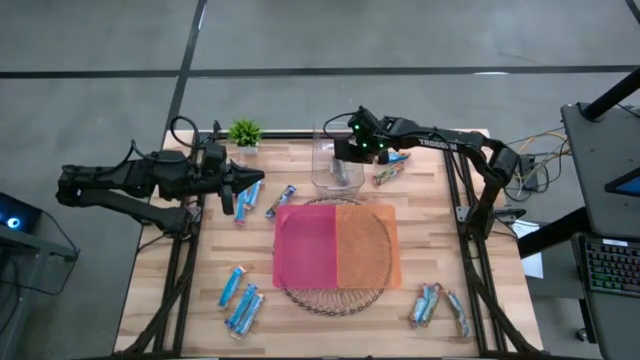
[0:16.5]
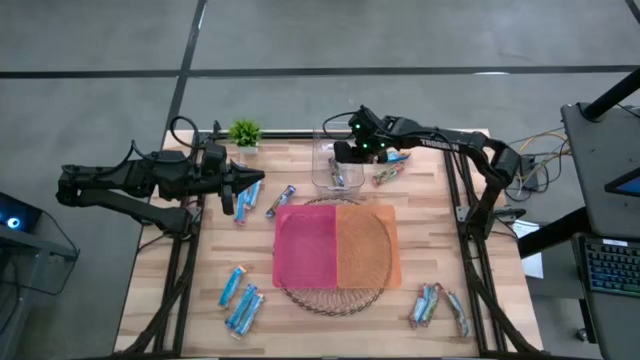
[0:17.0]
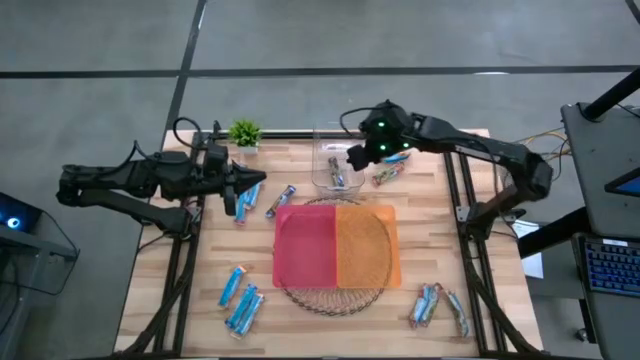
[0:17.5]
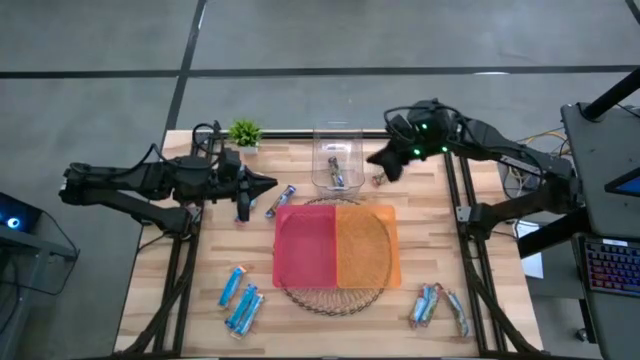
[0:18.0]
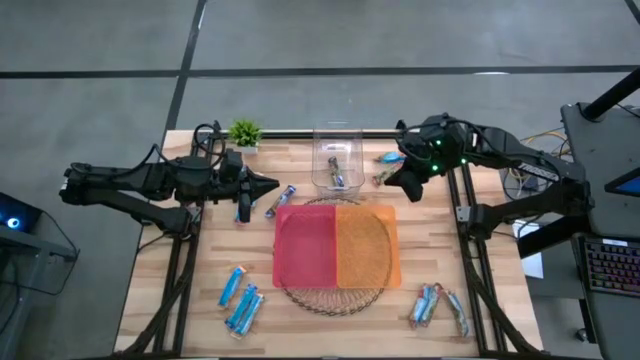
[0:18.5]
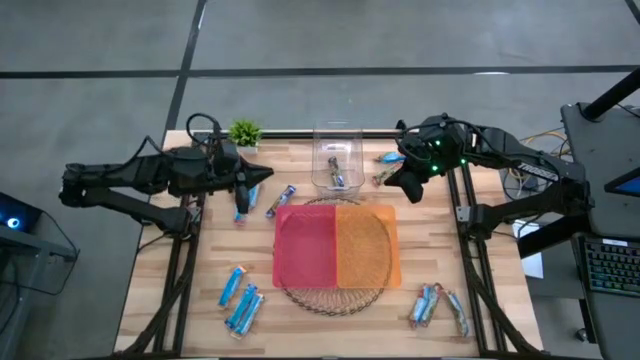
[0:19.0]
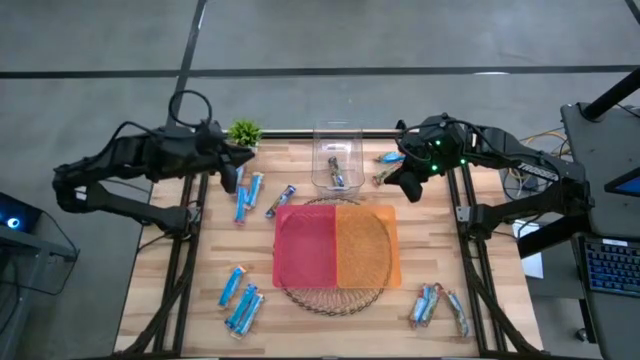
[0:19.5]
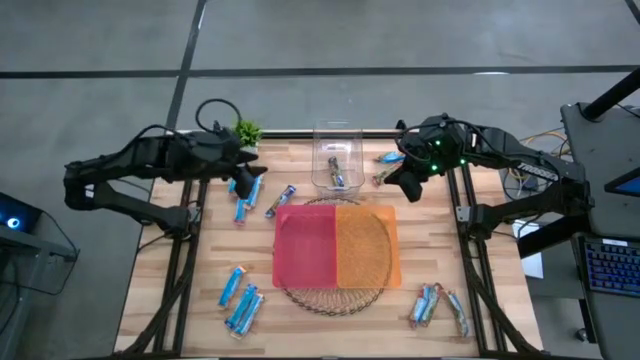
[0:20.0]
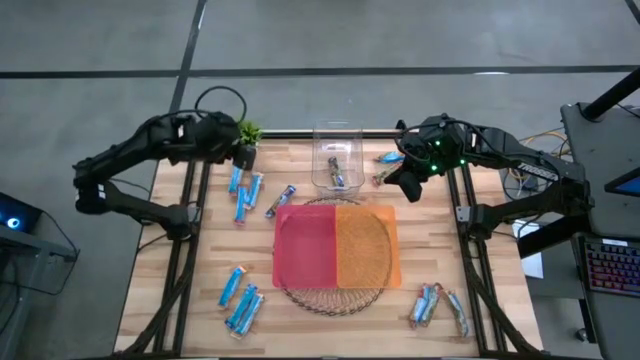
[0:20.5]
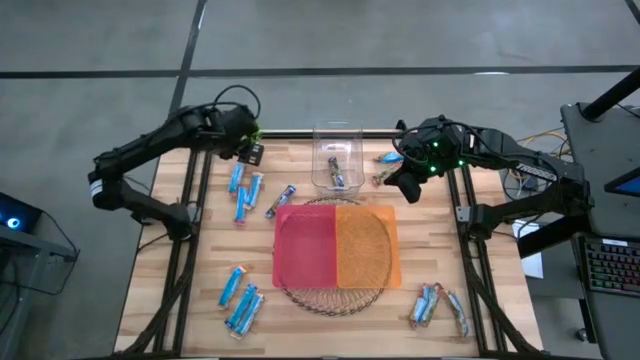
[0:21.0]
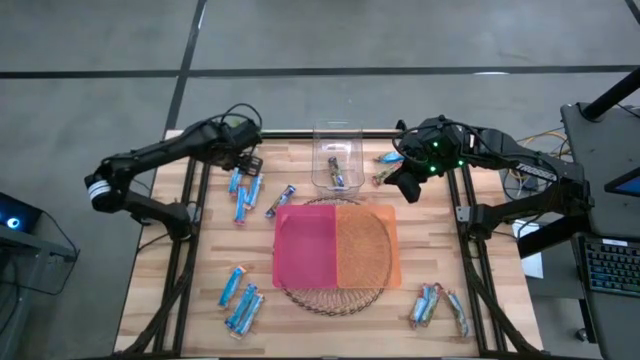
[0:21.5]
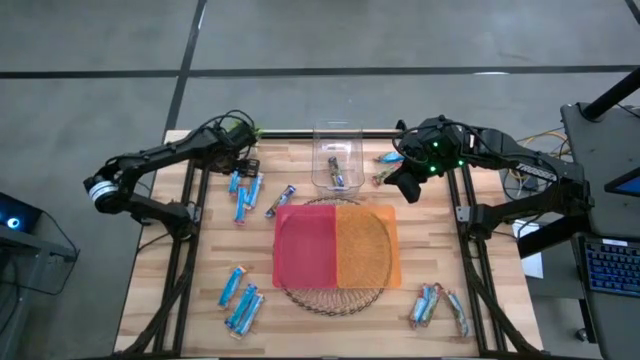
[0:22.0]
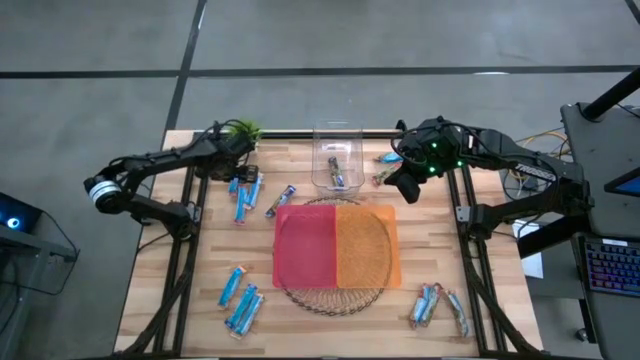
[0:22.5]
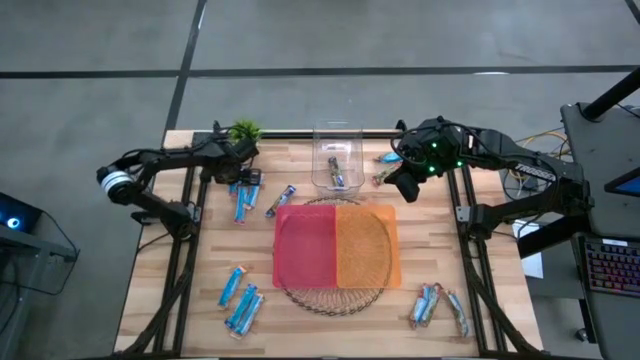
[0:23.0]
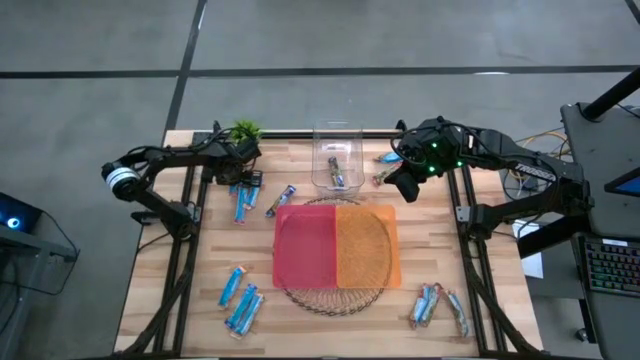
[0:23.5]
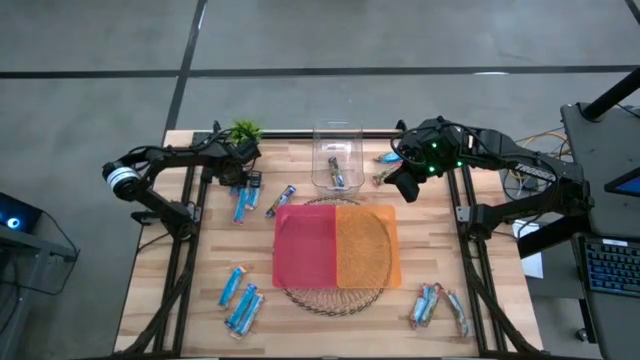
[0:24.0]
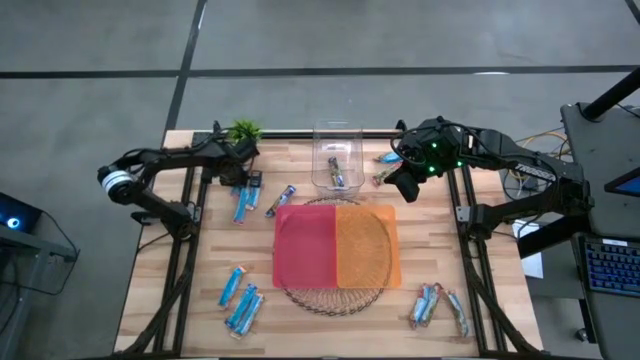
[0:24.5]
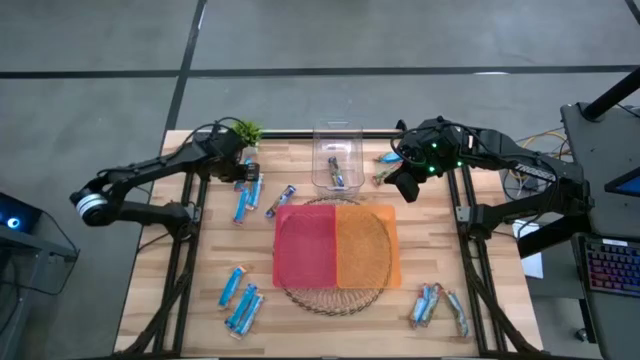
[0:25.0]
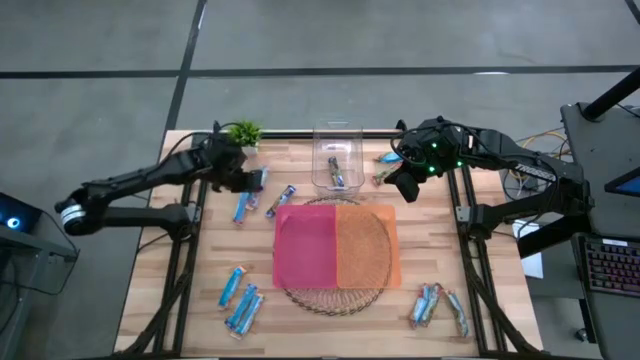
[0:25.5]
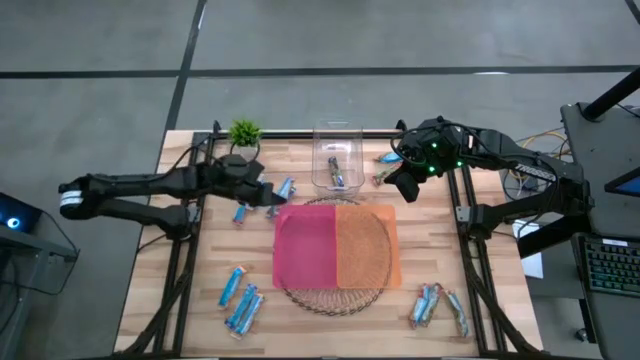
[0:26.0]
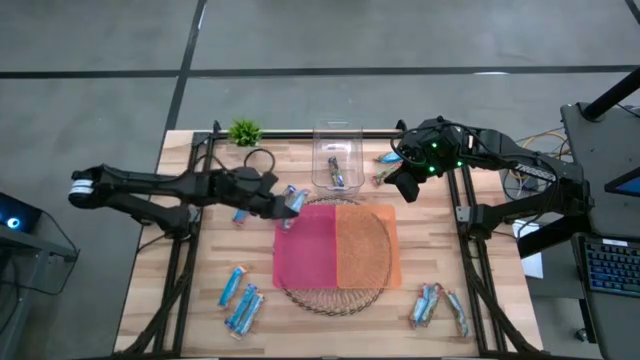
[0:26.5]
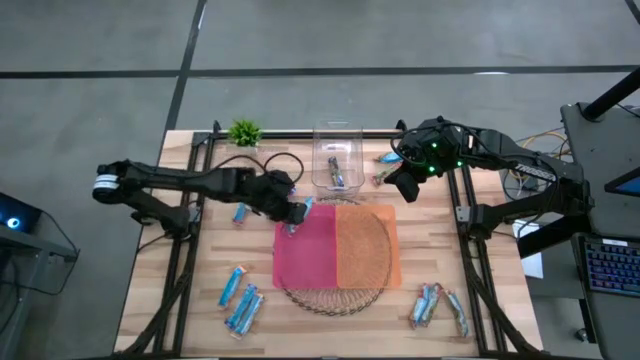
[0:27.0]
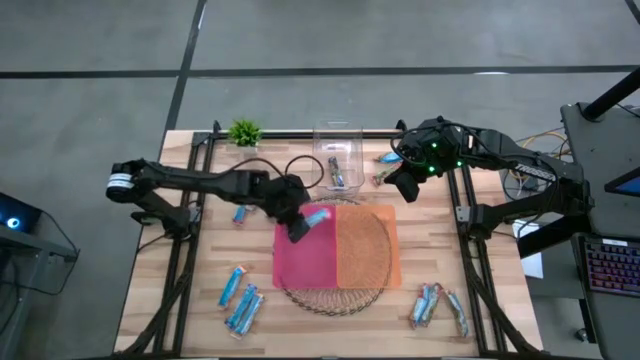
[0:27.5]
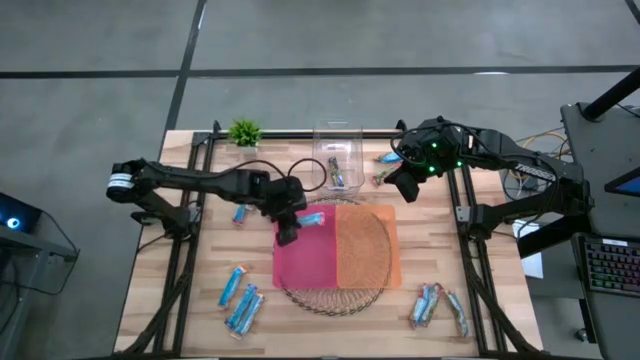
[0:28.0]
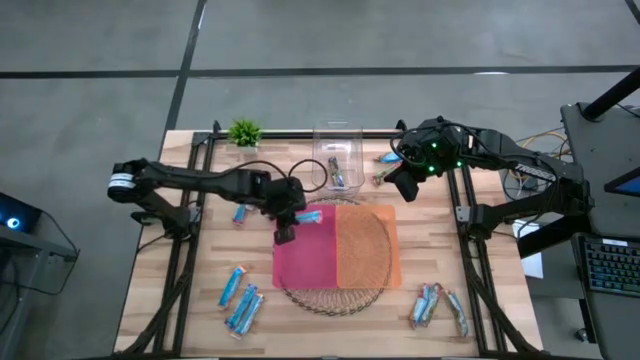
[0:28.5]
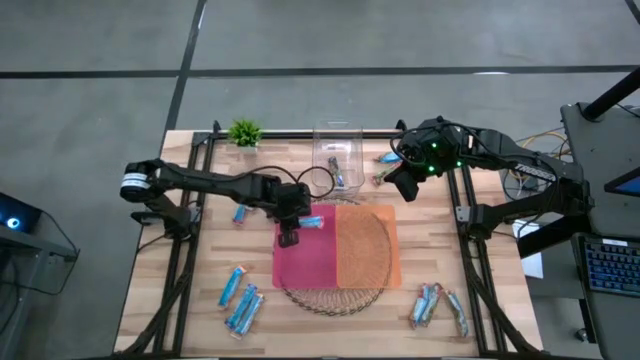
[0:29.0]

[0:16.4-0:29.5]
Task: Pick and place Granola Bars by type
Put the red granola bar into the red bin

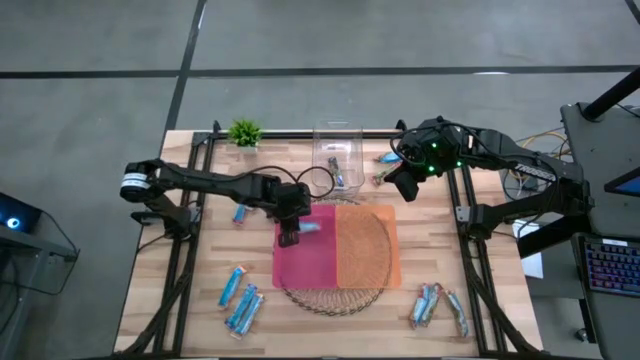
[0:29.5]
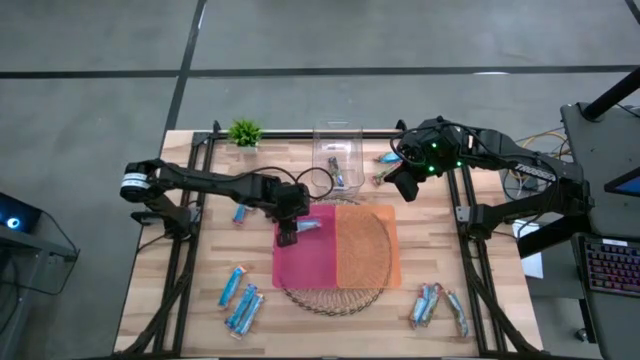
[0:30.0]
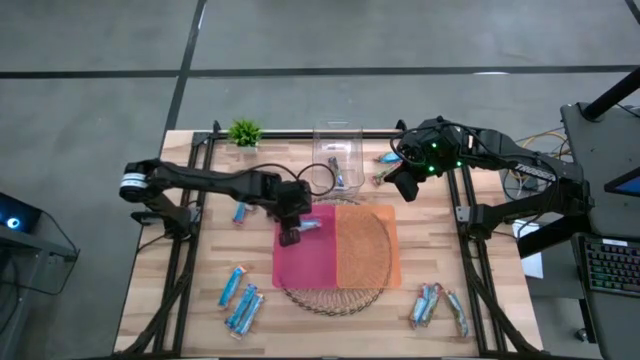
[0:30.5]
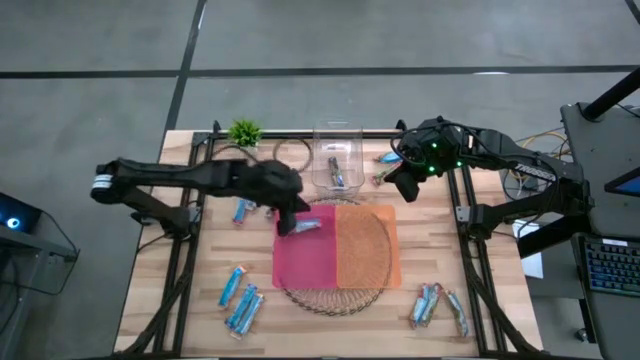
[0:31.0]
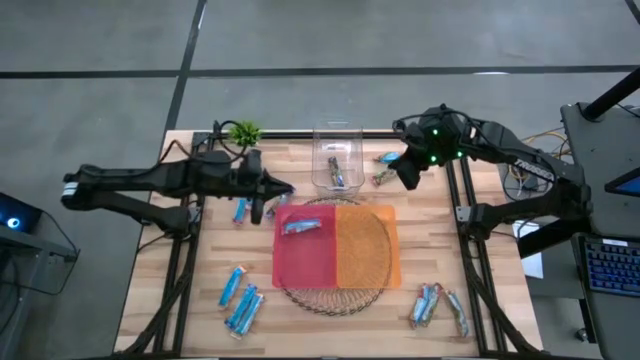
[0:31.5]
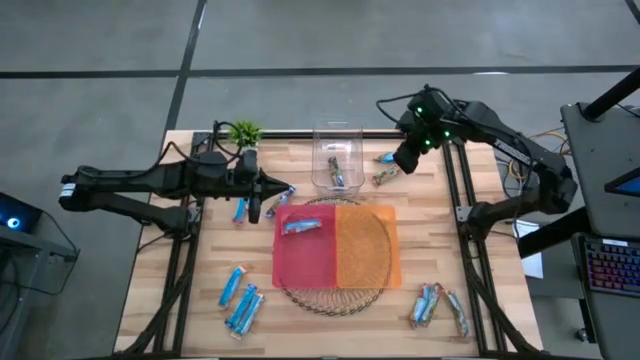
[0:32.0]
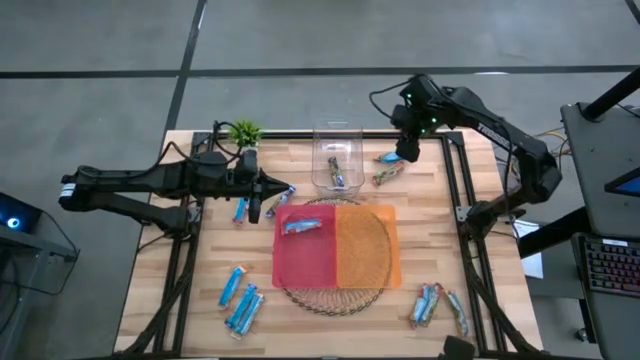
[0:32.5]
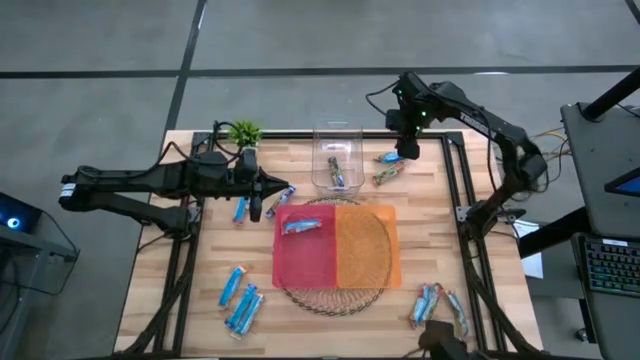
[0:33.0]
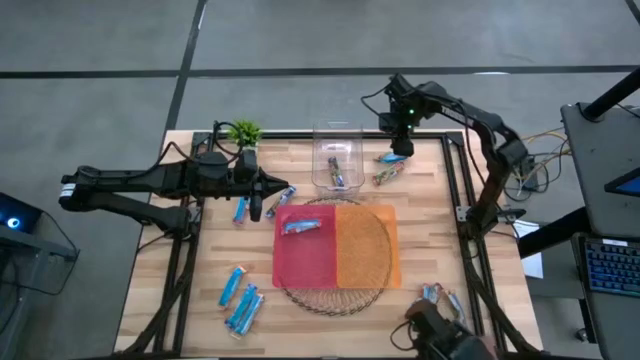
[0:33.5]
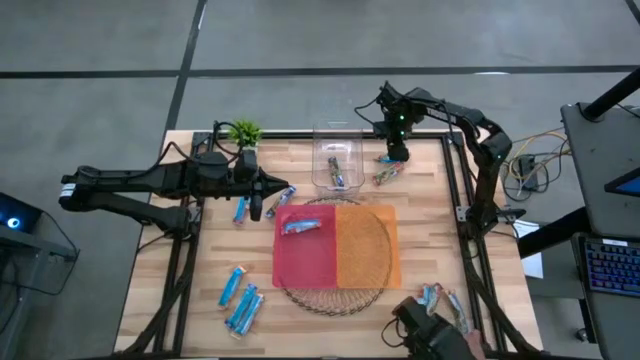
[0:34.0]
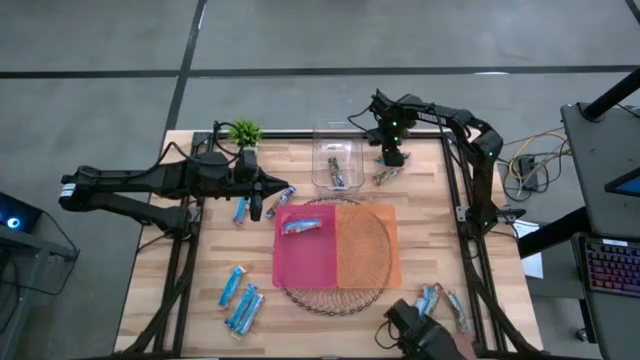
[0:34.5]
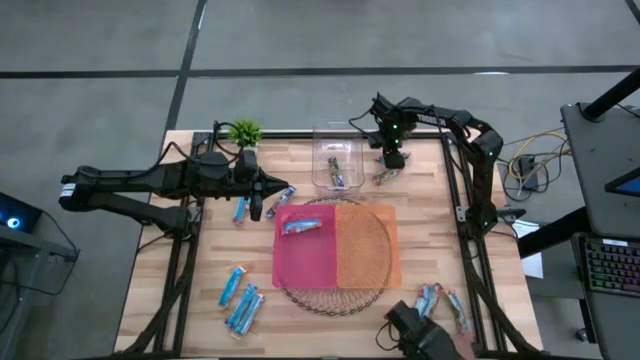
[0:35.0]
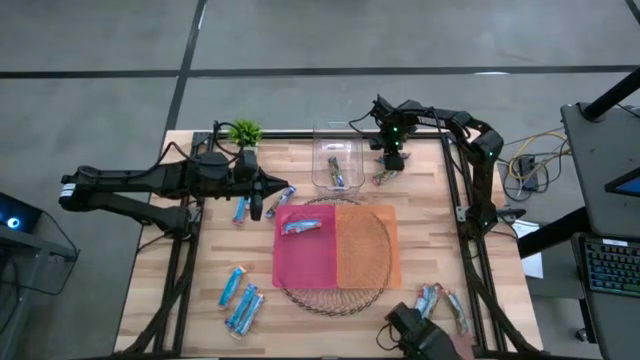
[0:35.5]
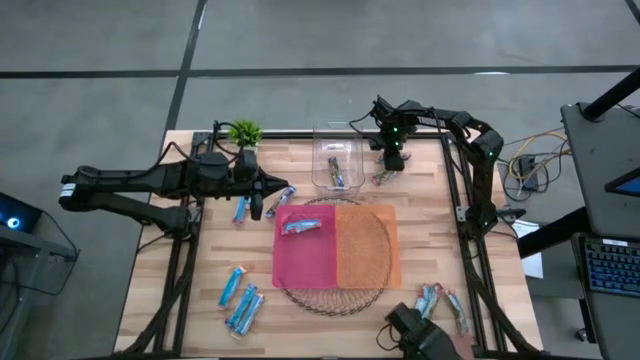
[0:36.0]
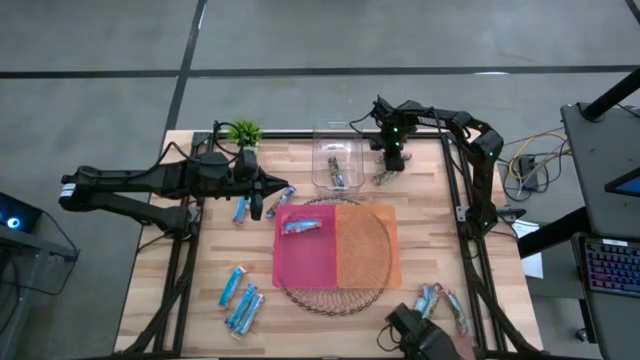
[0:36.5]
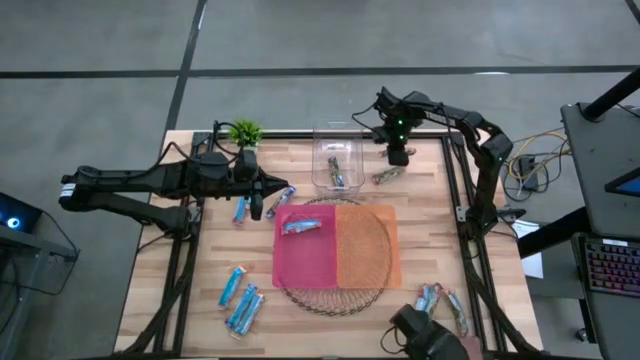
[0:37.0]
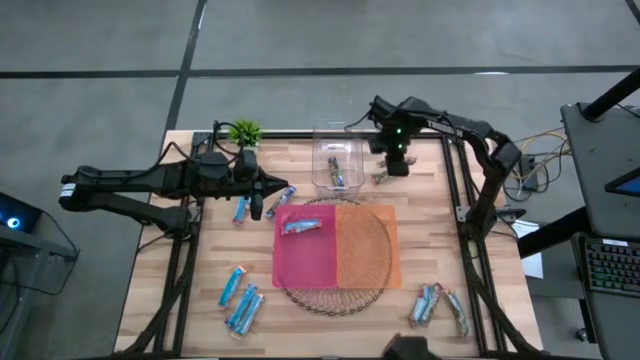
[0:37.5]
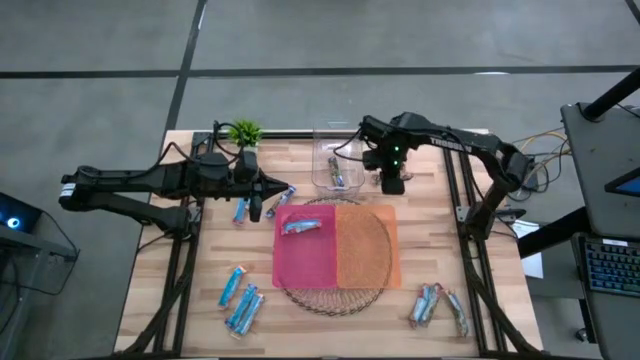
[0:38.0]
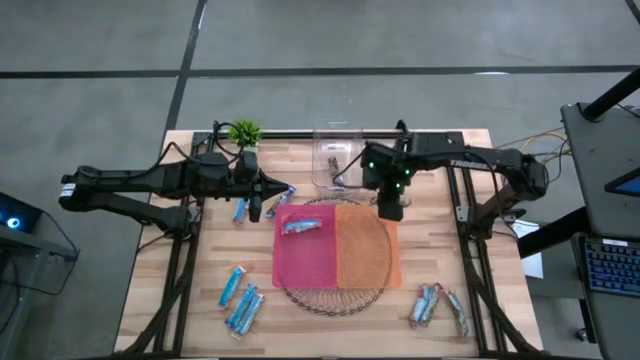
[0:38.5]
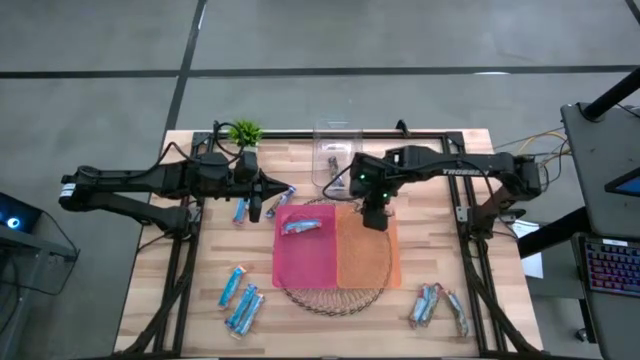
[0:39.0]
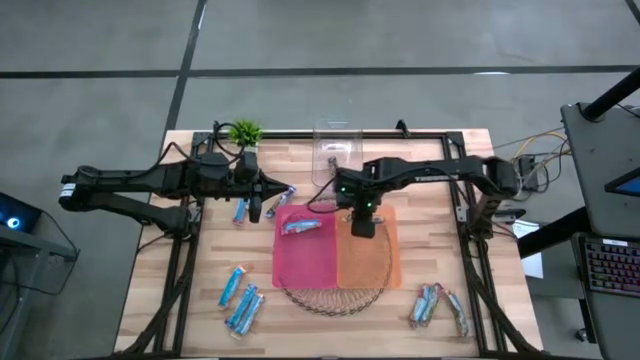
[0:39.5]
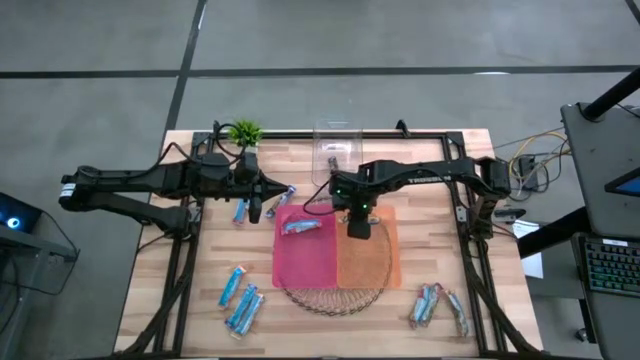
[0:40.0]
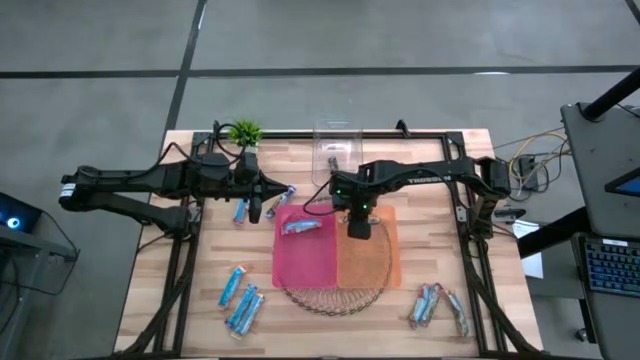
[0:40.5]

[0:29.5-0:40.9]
Put the yellow granola bar into the orange bin
